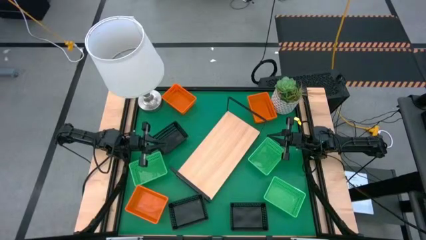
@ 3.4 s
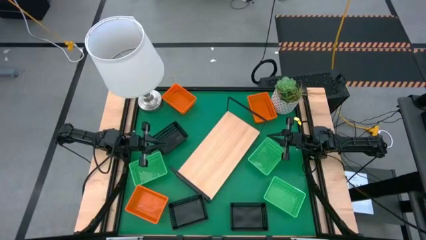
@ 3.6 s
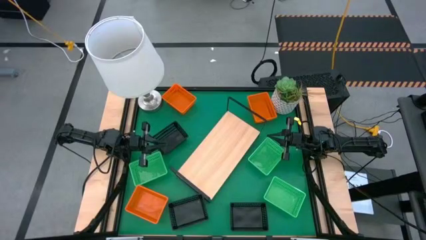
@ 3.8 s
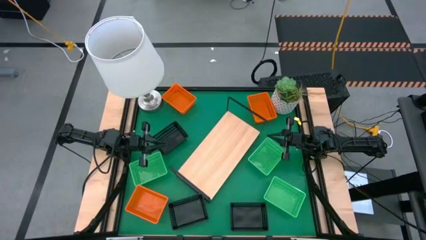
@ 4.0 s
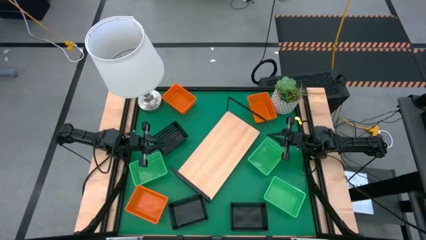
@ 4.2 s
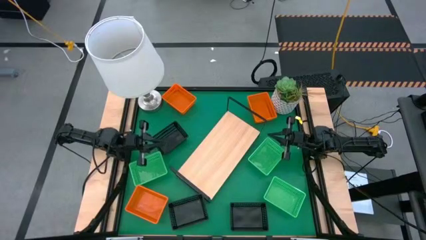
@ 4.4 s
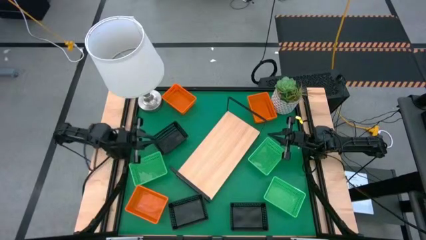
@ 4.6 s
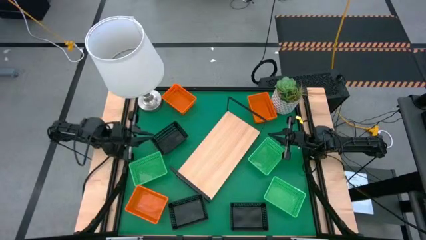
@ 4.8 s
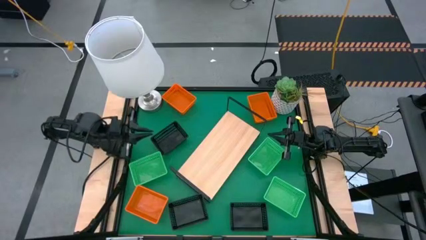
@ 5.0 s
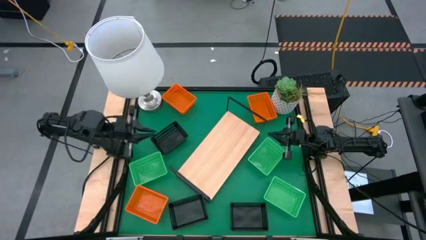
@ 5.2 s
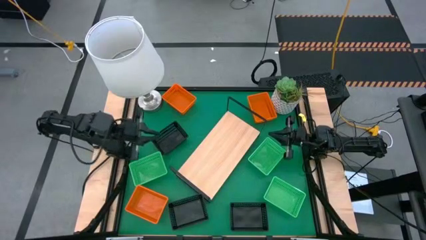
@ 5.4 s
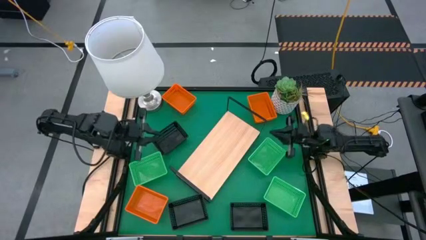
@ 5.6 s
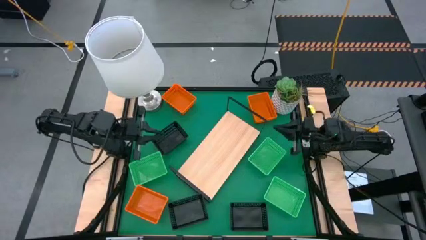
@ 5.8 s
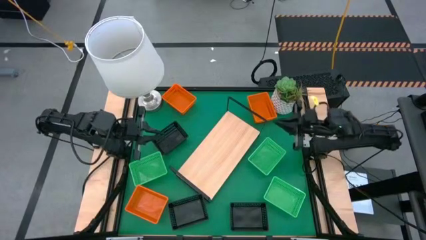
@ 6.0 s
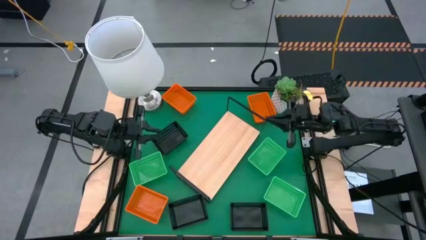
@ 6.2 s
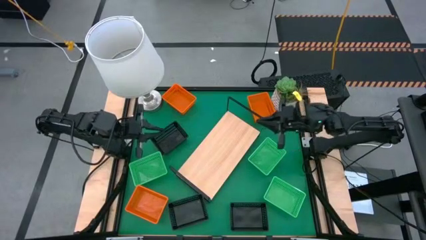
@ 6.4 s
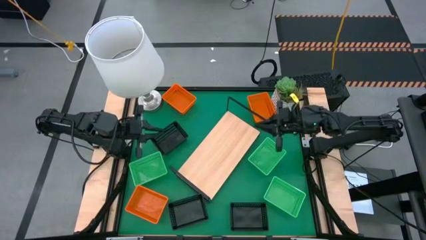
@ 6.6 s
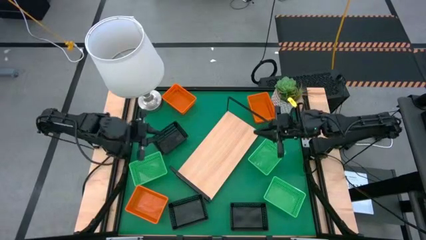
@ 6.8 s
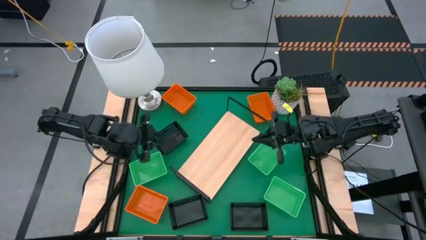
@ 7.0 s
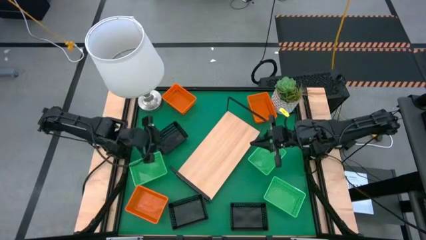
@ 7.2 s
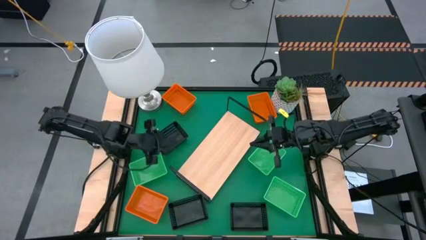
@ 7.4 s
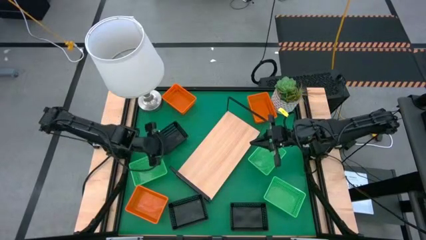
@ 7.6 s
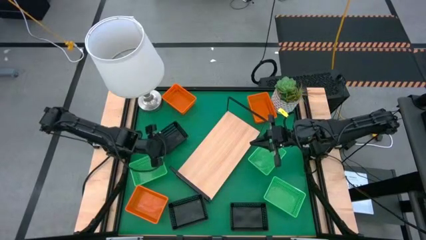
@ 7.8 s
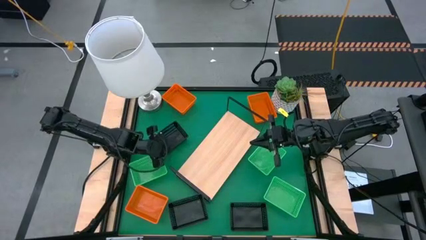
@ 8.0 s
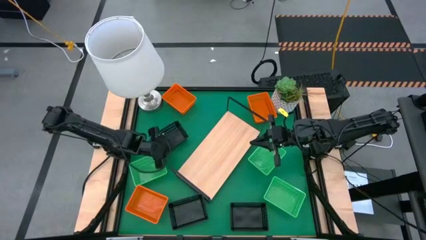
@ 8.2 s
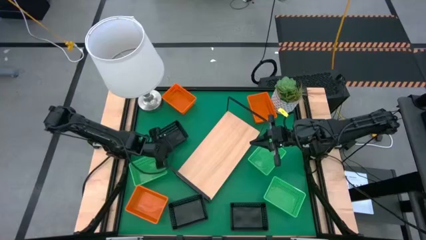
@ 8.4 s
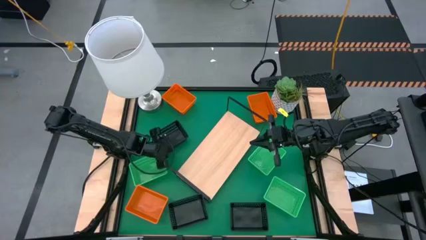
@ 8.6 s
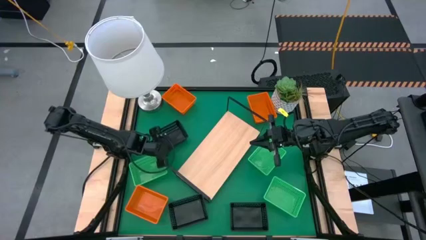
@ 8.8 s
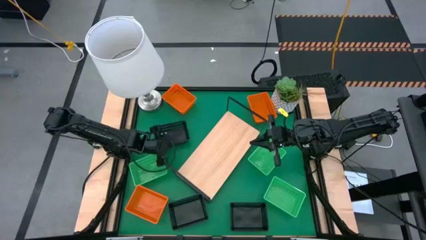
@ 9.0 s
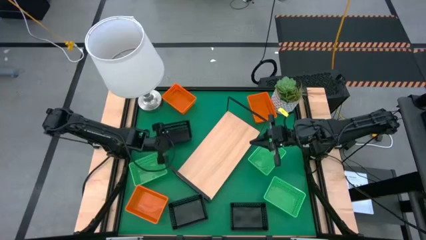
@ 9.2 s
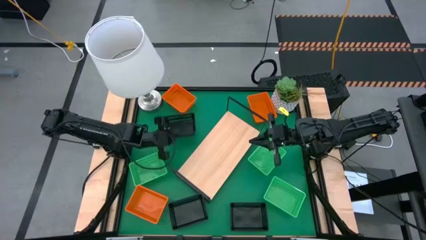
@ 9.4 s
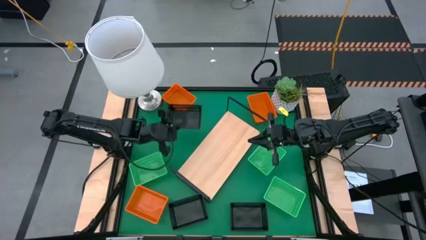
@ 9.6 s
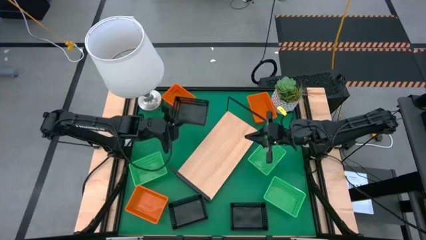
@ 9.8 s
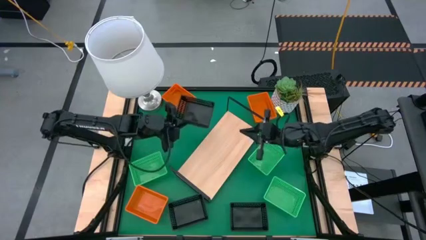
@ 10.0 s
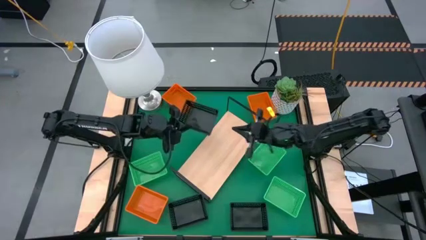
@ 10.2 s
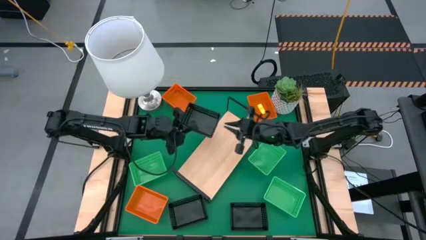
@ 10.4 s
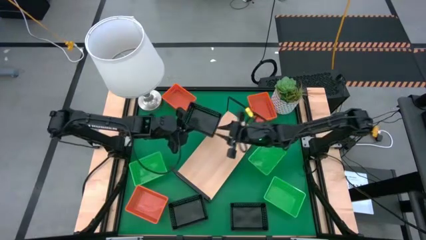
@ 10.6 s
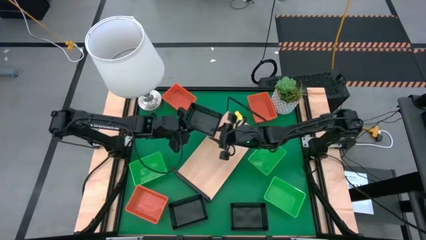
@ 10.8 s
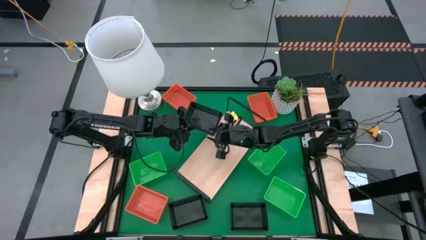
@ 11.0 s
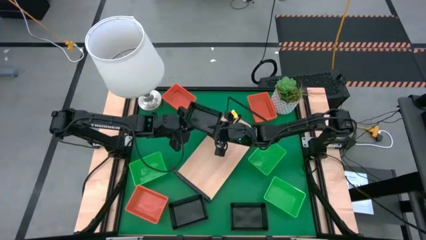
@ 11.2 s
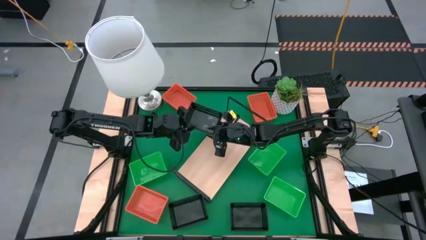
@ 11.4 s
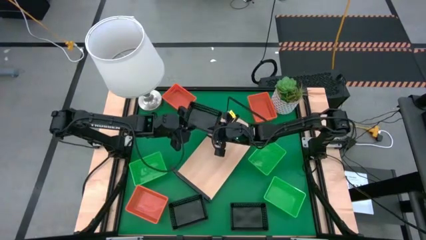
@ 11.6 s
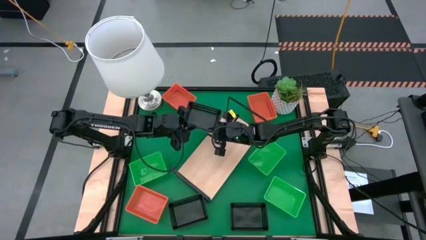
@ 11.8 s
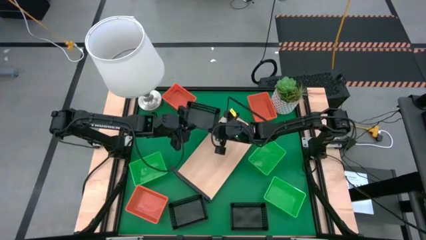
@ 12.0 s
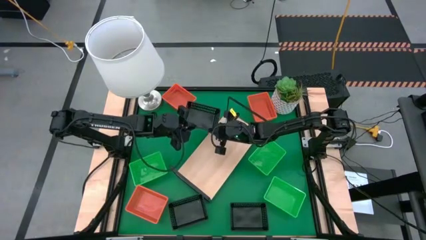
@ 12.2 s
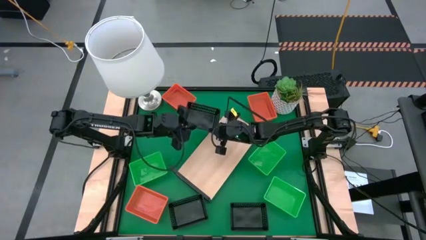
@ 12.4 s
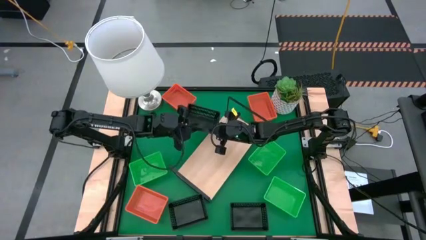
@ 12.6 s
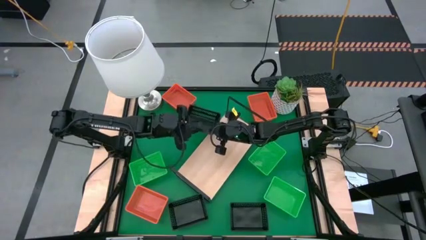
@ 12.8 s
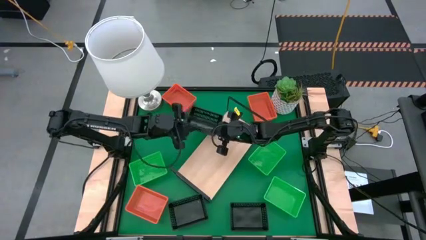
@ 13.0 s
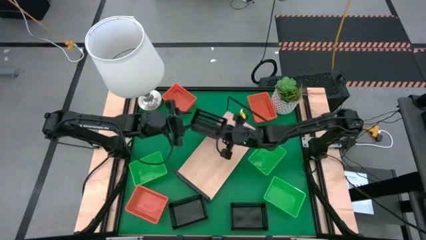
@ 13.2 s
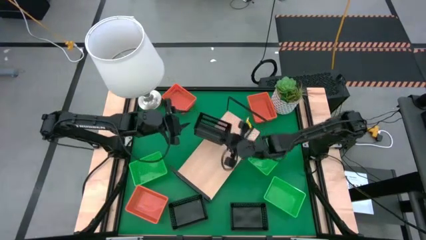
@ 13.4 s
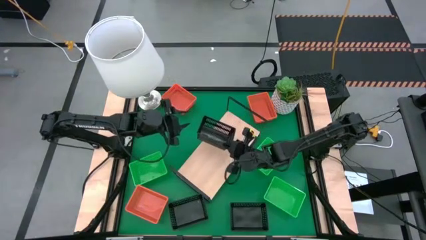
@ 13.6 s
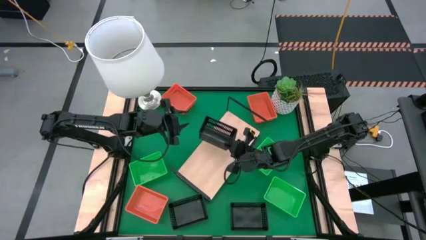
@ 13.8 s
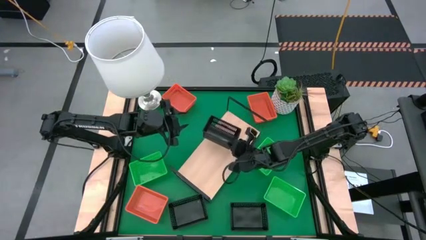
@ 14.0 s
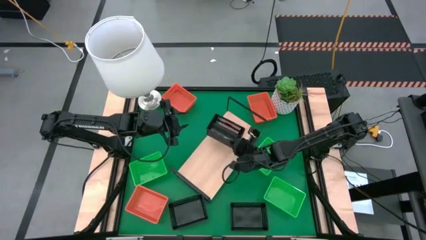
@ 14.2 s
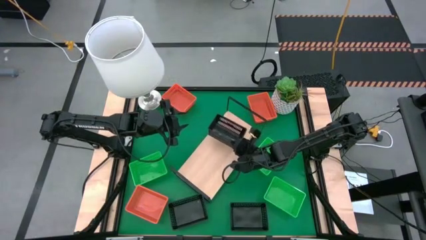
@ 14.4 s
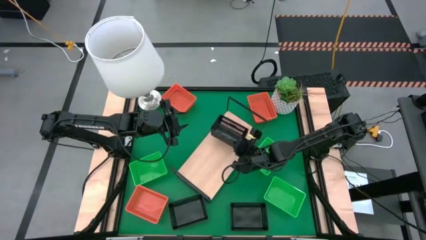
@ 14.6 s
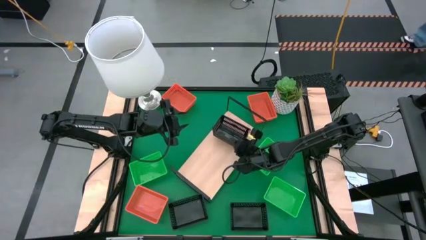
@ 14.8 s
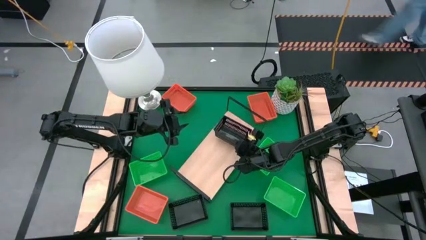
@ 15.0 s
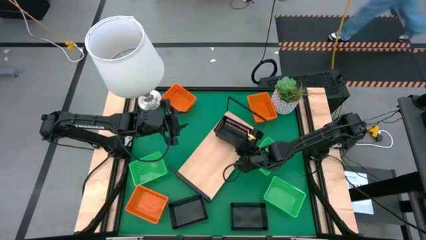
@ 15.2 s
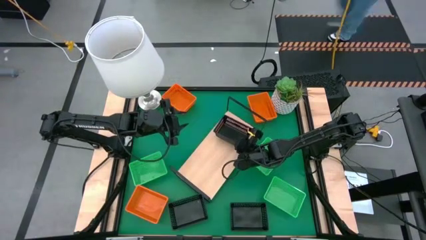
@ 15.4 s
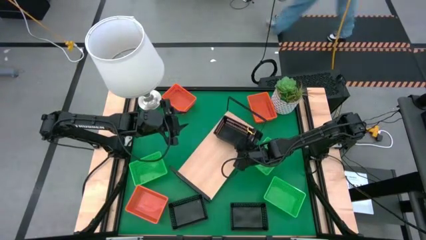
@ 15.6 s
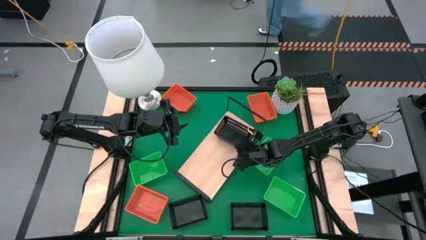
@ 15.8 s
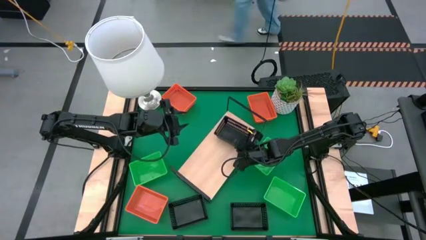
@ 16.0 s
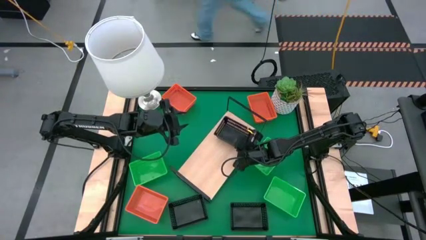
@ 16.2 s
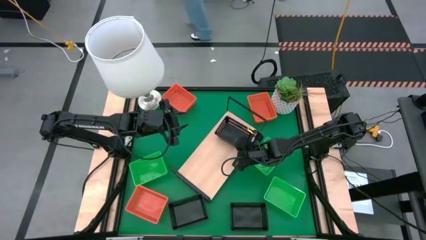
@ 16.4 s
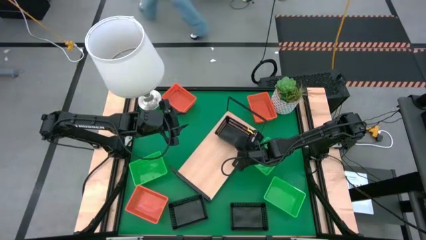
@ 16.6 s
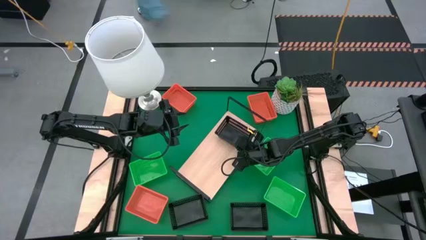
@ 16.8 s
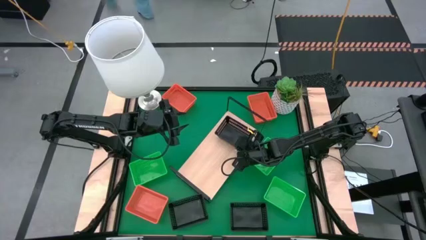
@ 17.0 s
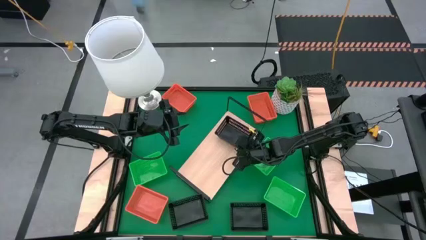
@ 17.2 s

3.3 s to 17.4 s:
Task: Stack baskets on shelf by color
Put the top black bin on the shelf
